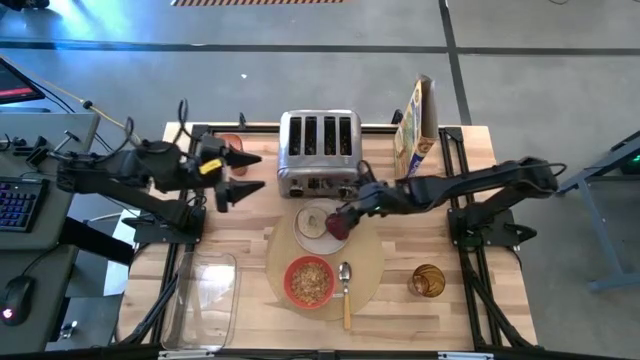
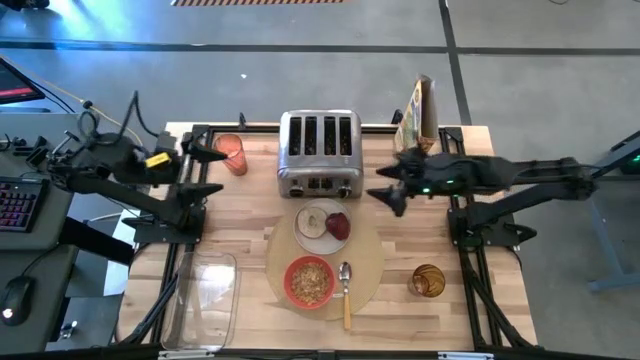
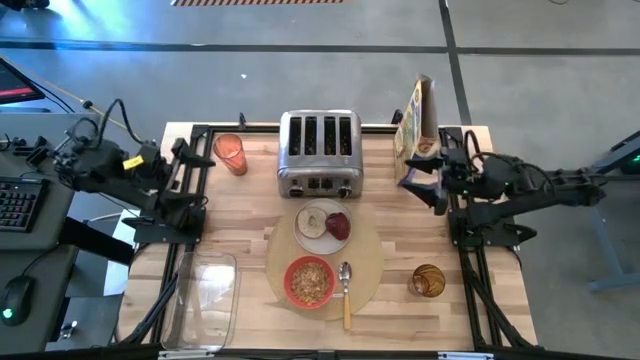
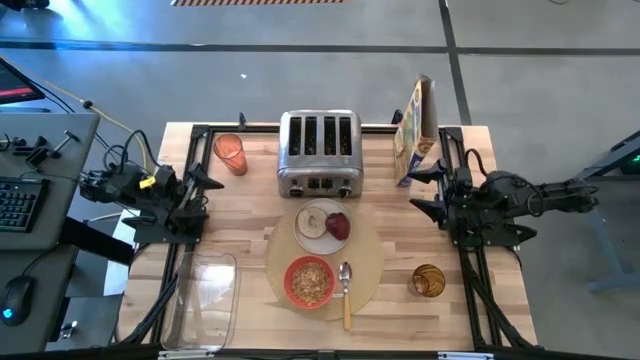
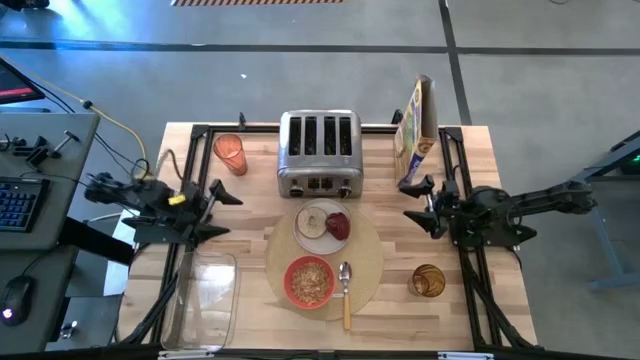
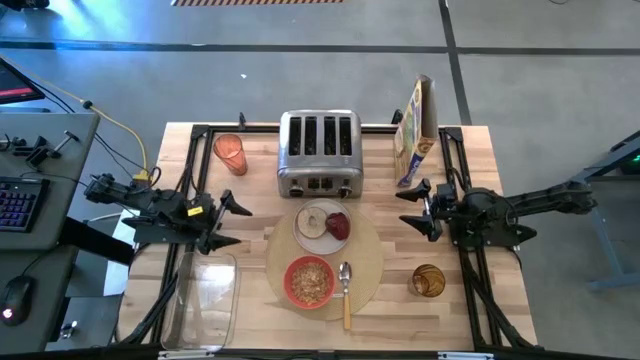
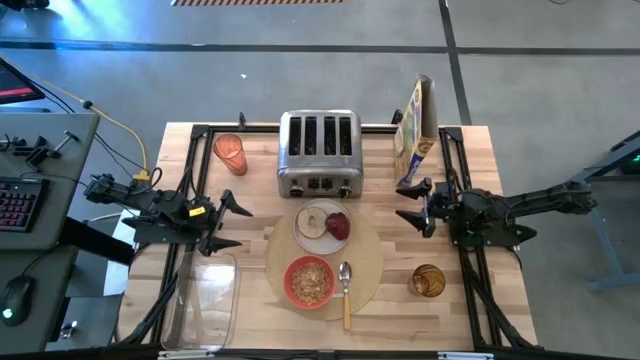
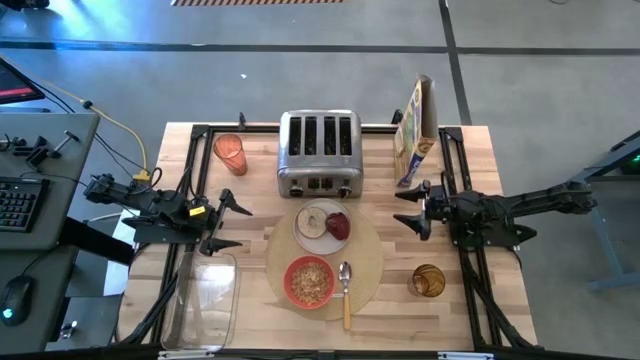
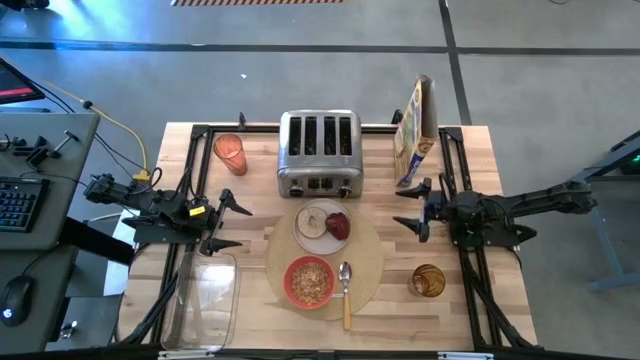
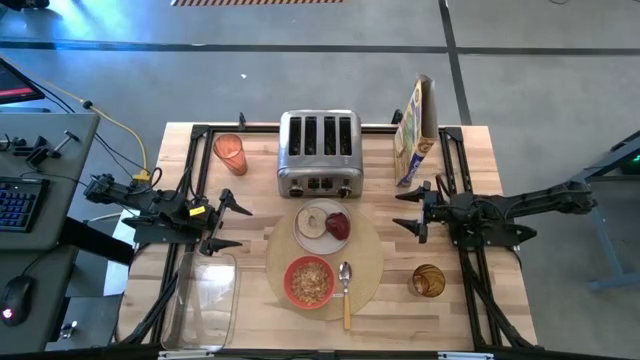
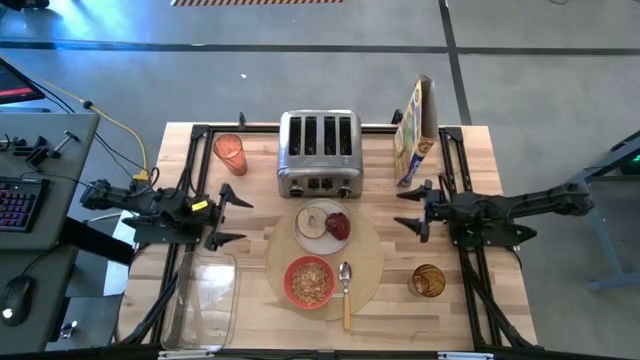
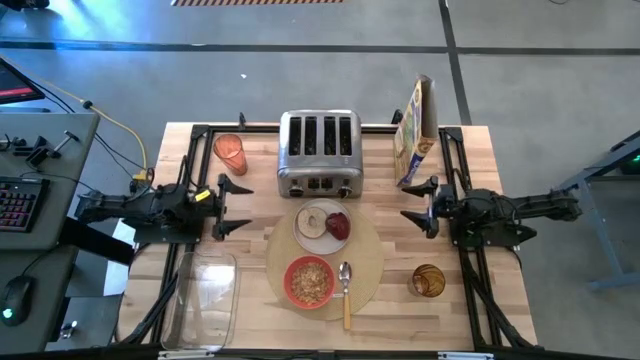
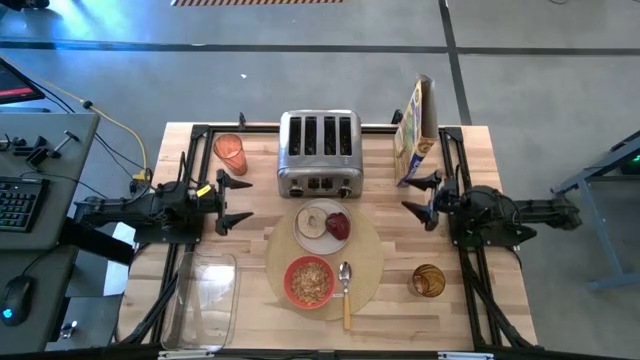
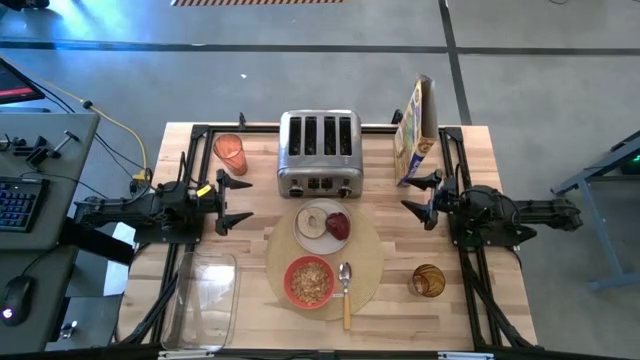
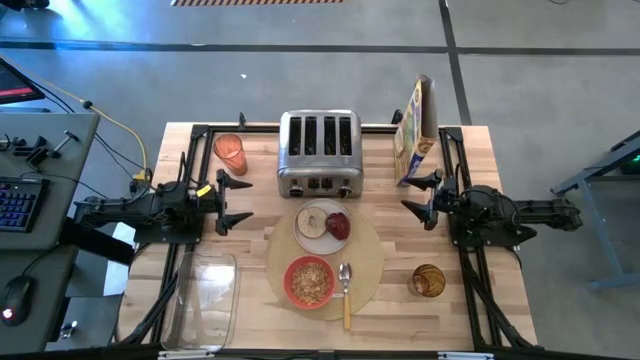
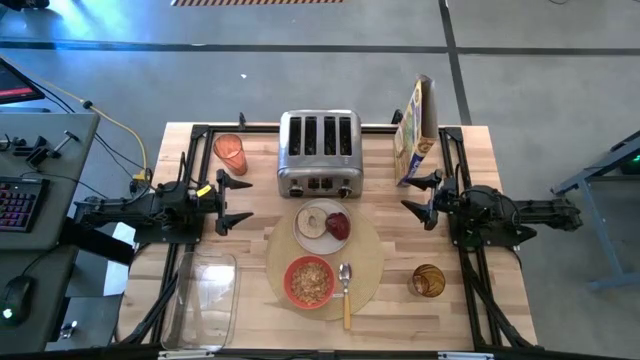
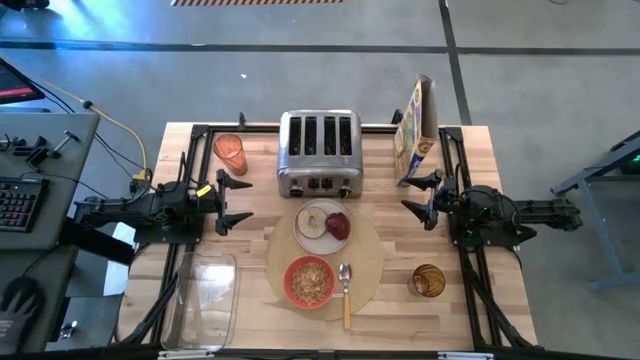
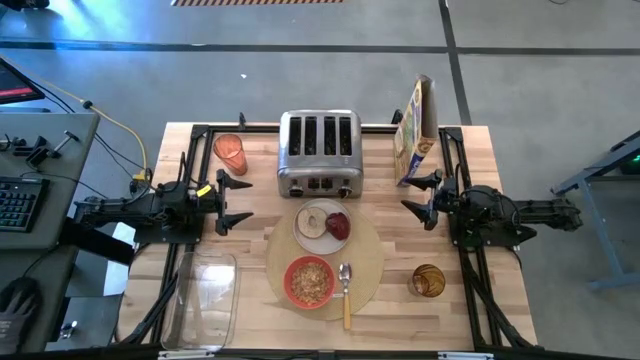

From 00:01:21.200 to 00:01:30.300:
Task: Arrange a breakfast setting
Return to Home Position

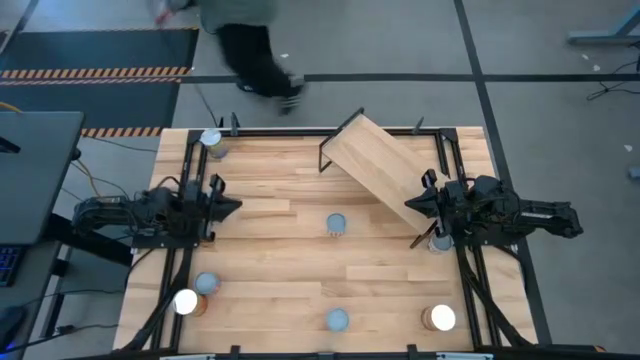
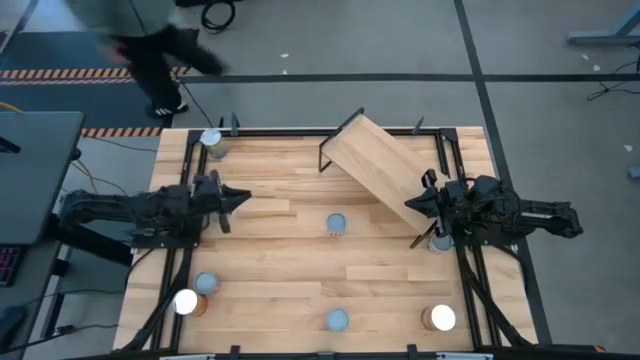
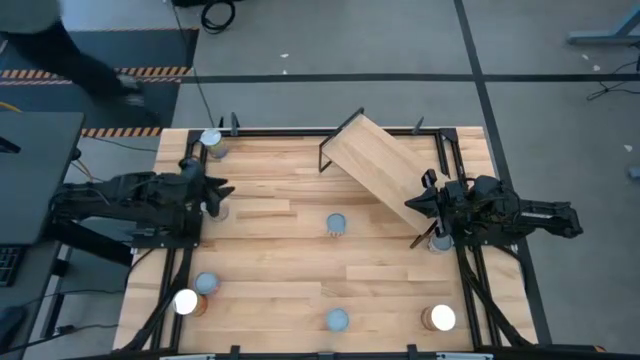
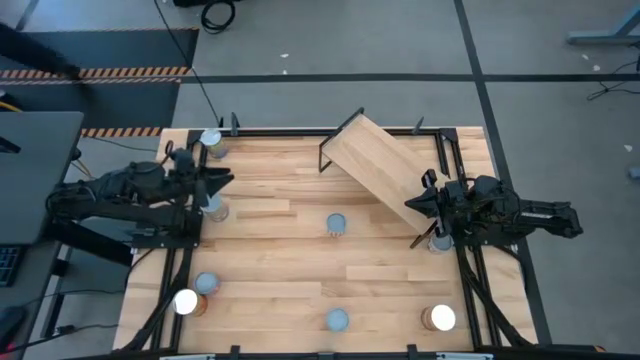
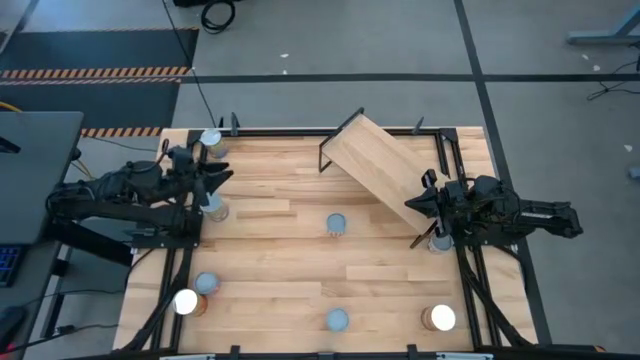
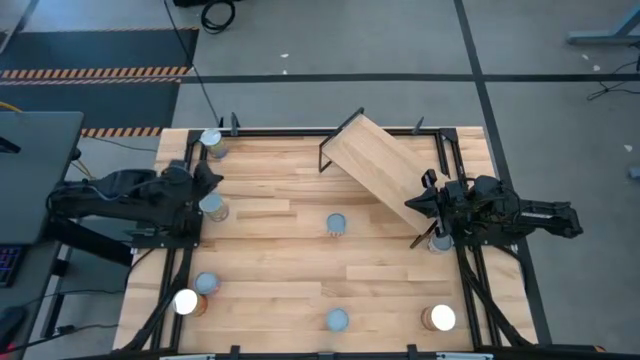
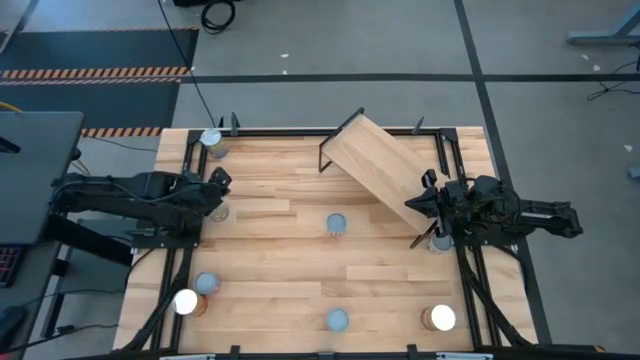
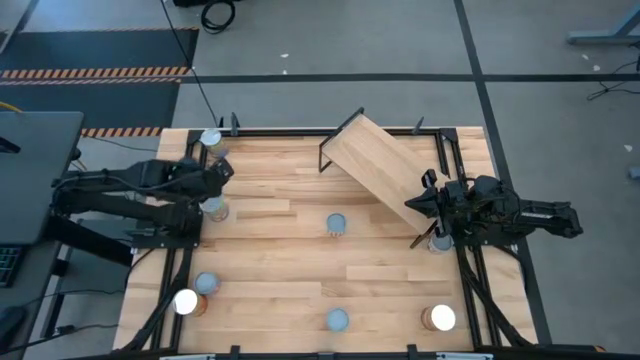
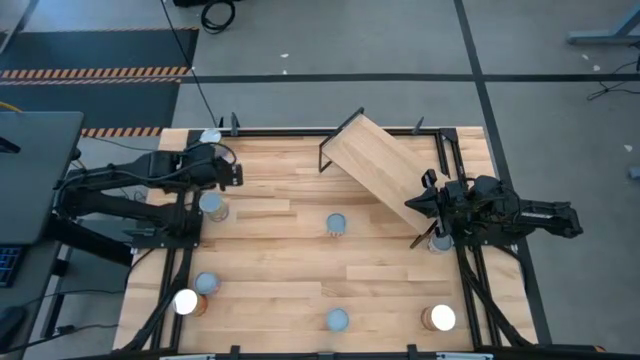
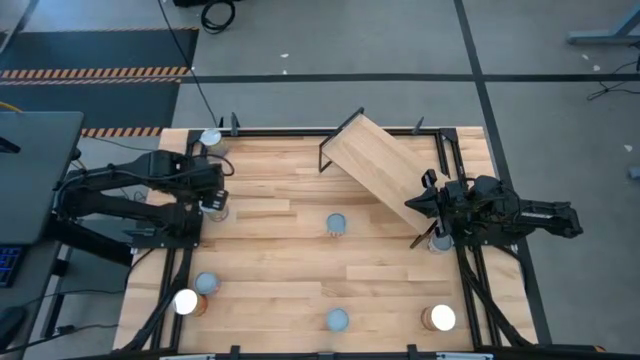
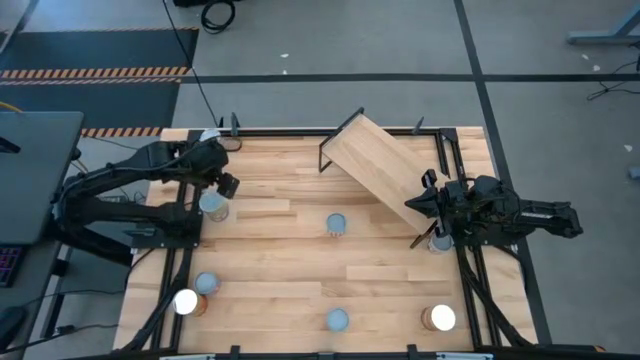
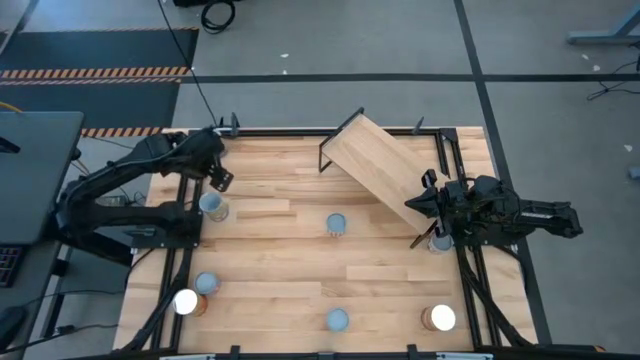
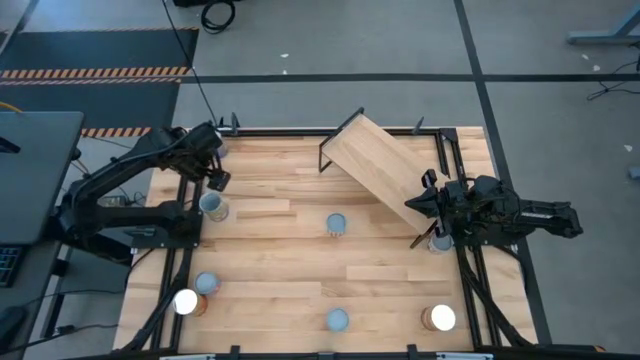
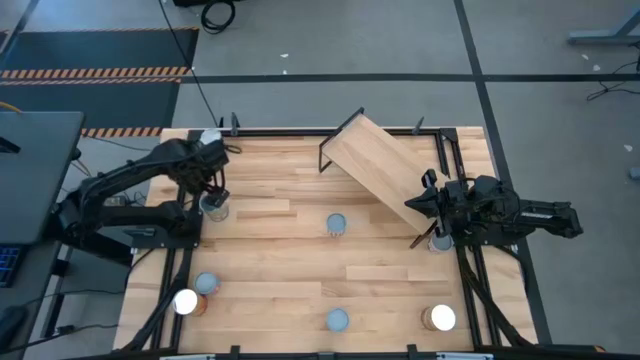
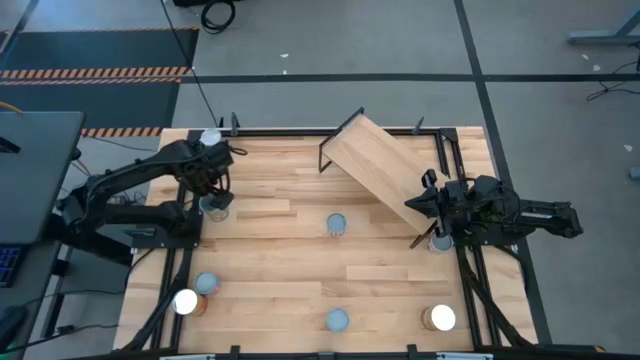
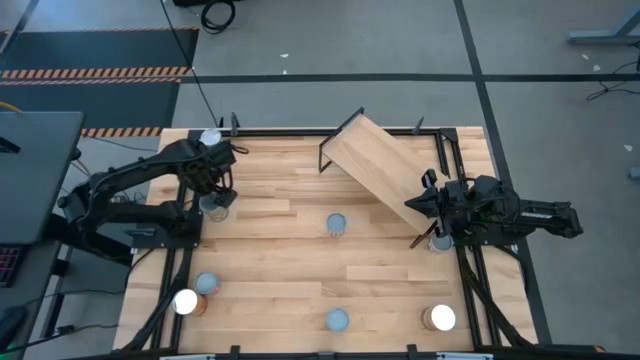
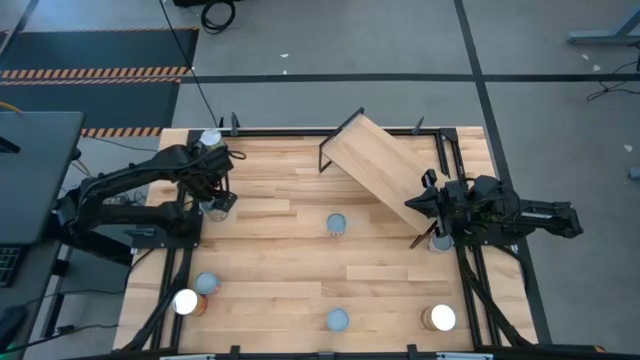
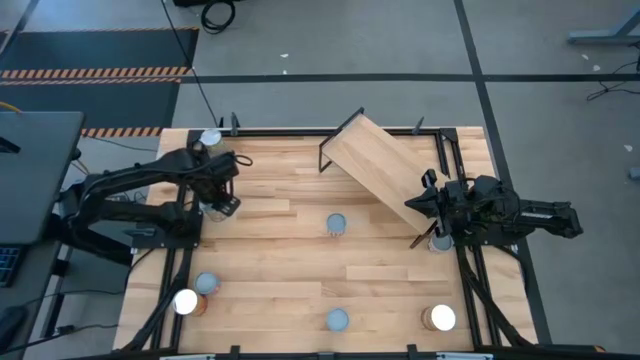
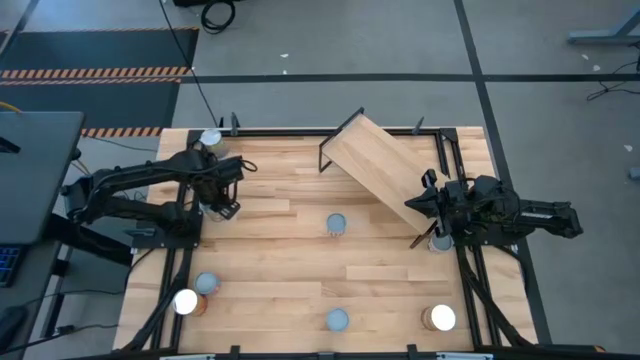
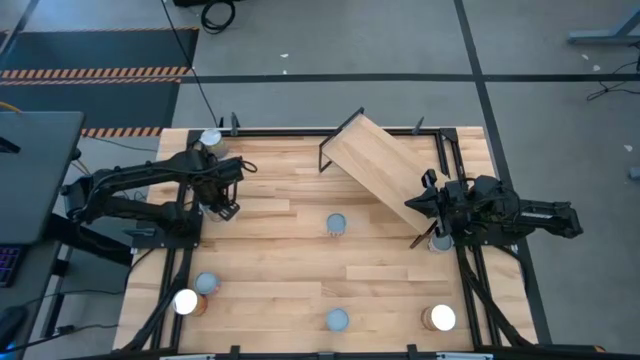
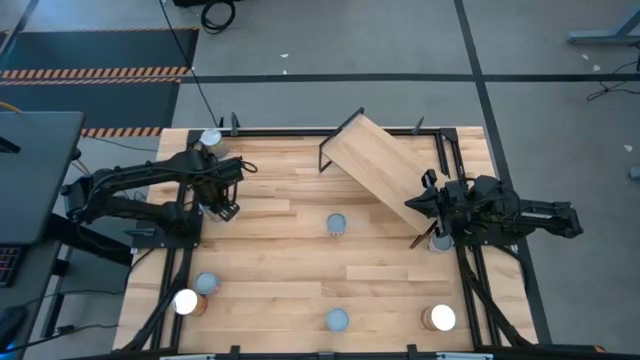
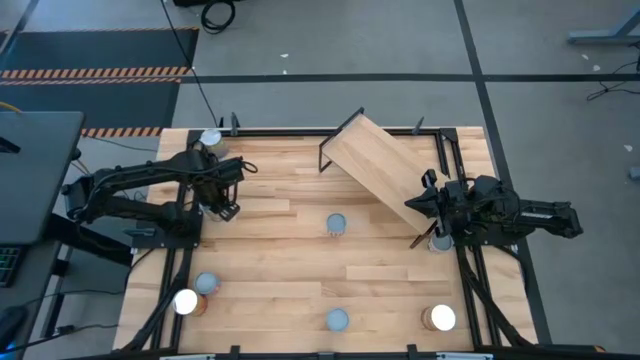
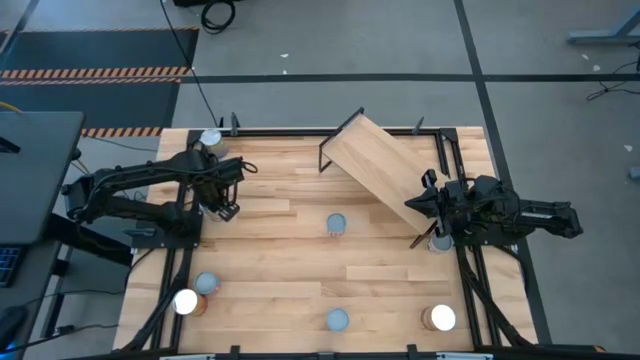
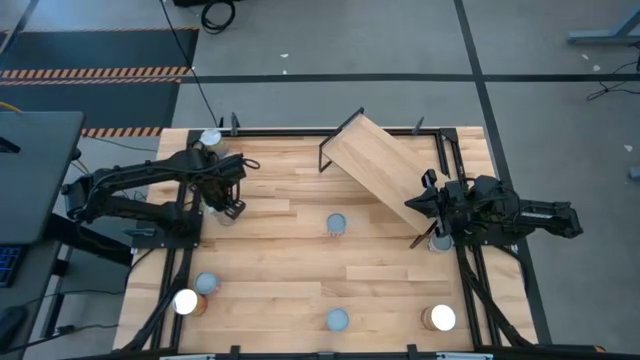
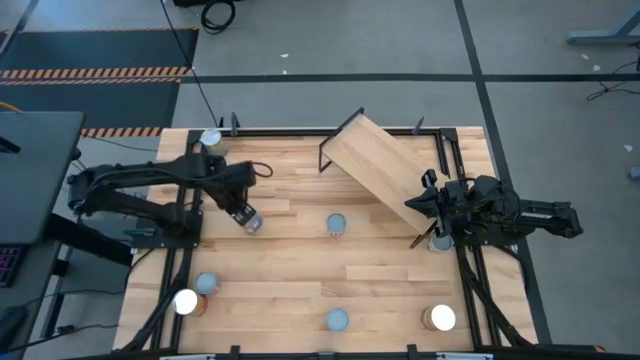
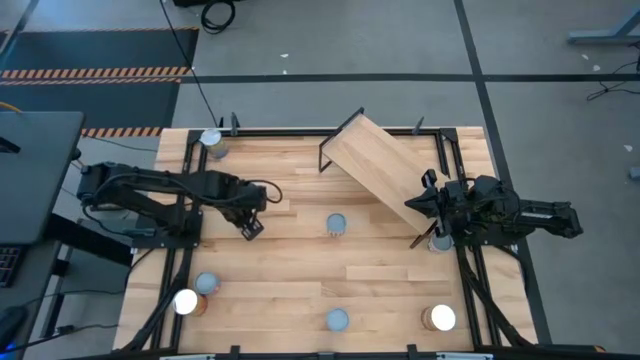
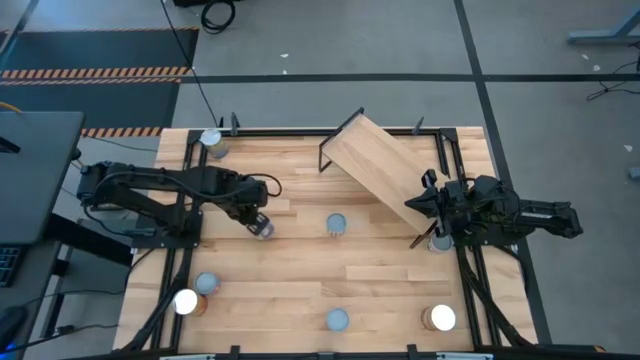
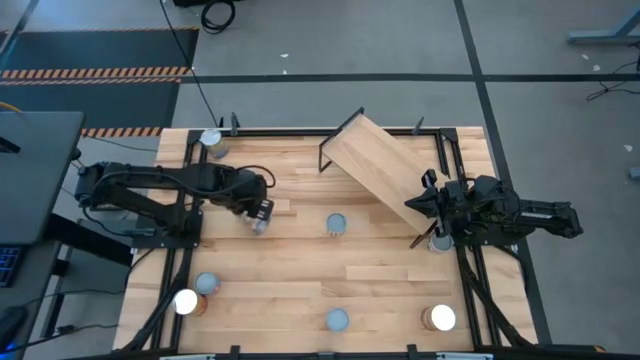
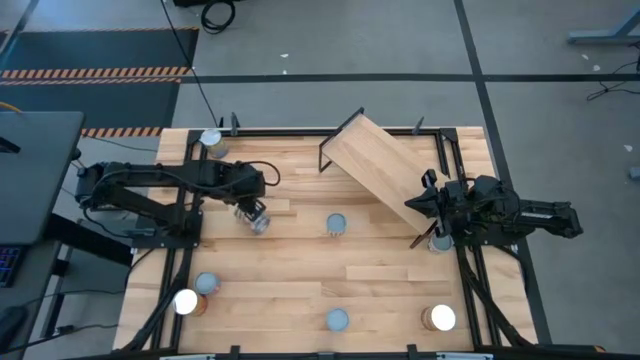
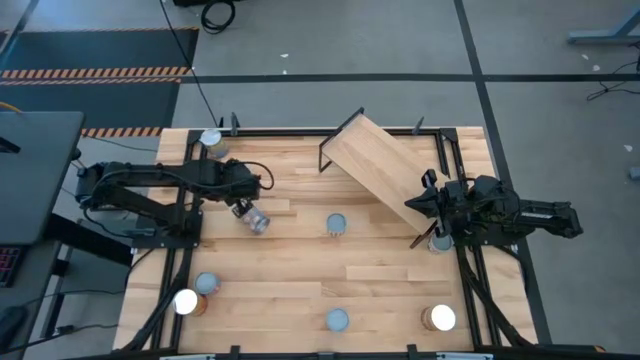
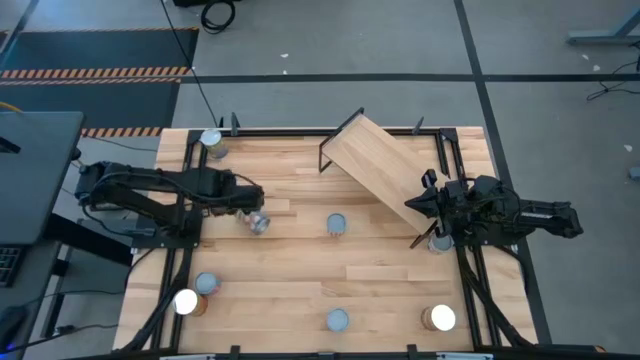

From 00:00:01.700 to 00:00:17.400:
Task: Pick and place cans onto a shelf
Put the bottom canned peaches can on the shelf
